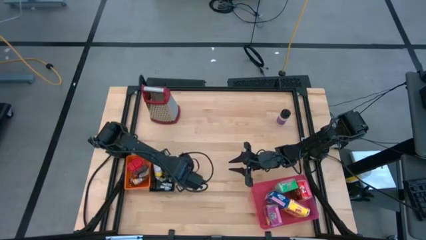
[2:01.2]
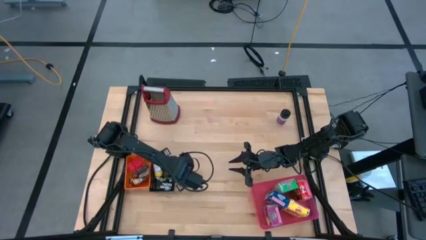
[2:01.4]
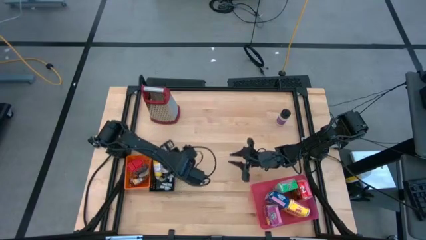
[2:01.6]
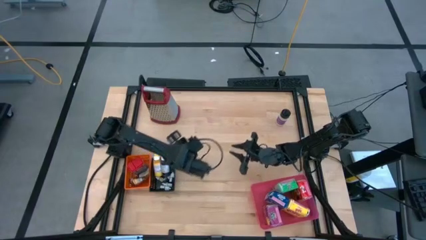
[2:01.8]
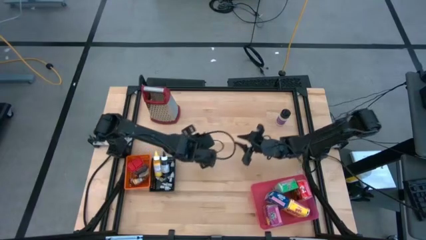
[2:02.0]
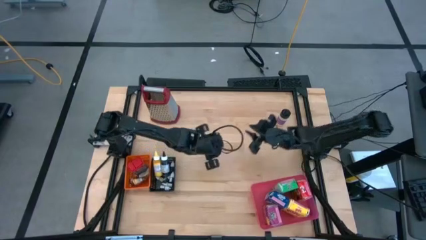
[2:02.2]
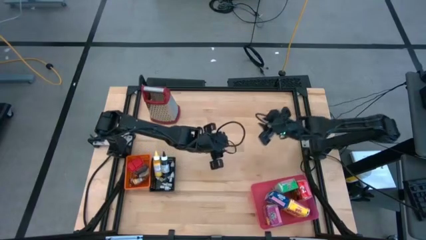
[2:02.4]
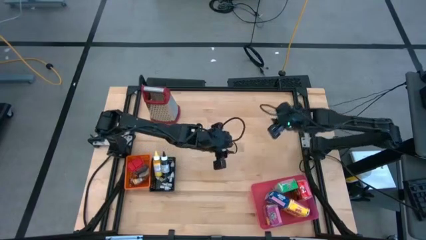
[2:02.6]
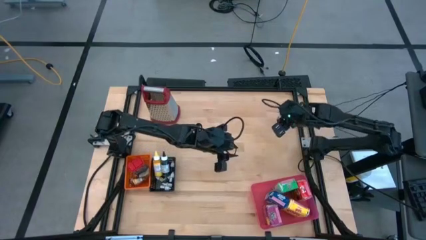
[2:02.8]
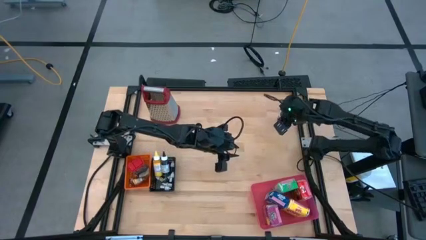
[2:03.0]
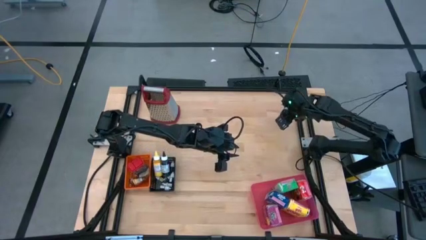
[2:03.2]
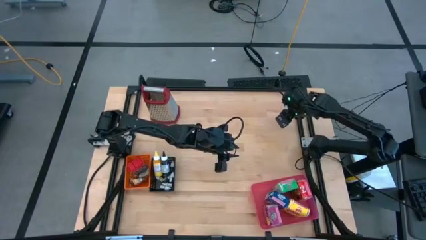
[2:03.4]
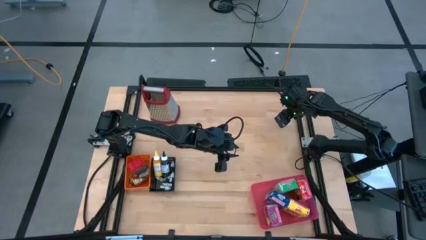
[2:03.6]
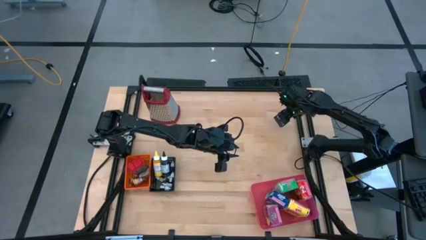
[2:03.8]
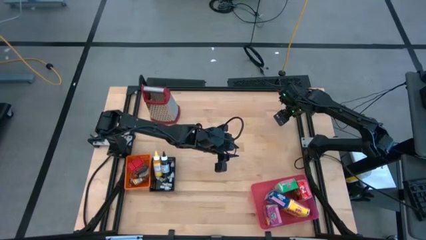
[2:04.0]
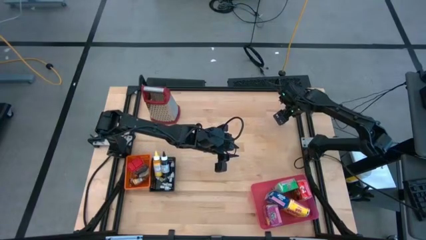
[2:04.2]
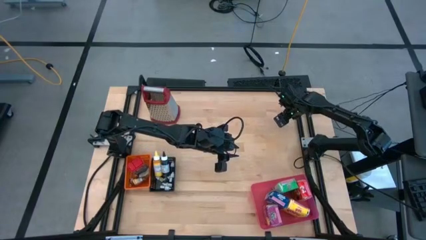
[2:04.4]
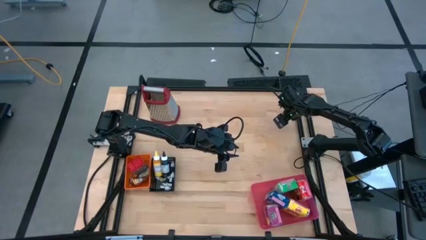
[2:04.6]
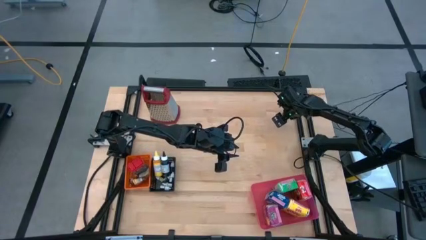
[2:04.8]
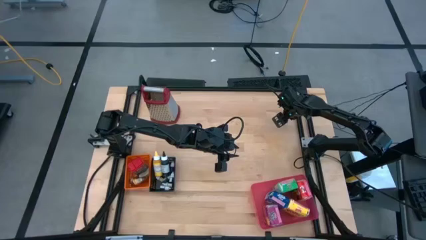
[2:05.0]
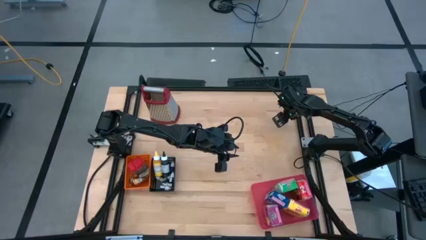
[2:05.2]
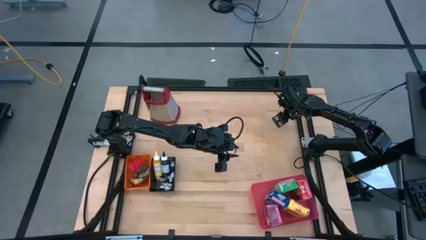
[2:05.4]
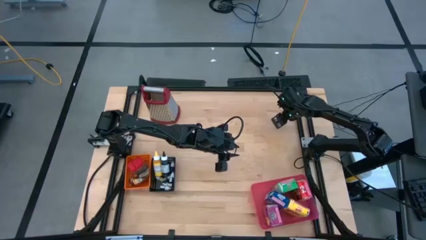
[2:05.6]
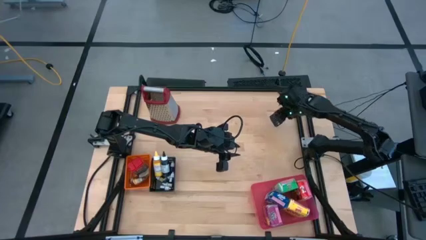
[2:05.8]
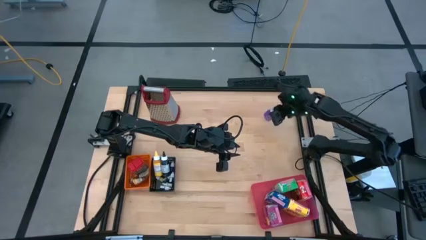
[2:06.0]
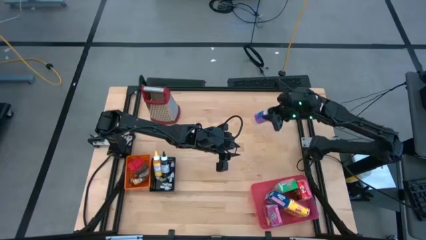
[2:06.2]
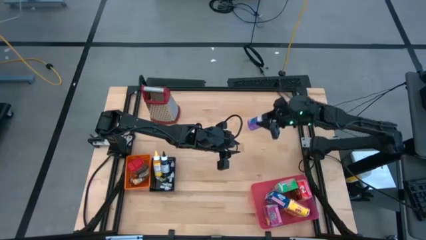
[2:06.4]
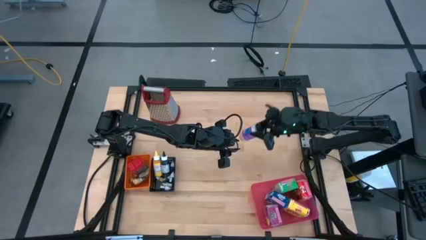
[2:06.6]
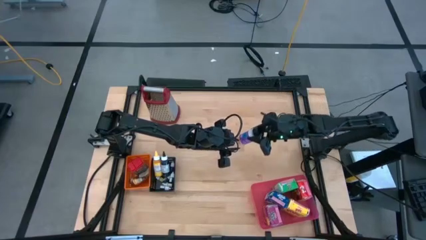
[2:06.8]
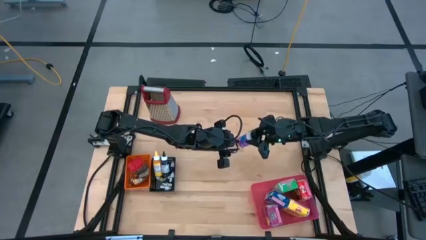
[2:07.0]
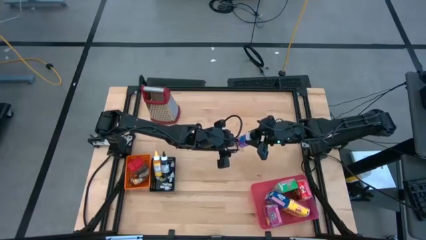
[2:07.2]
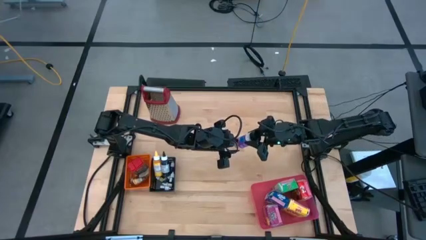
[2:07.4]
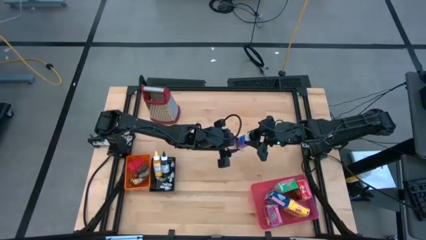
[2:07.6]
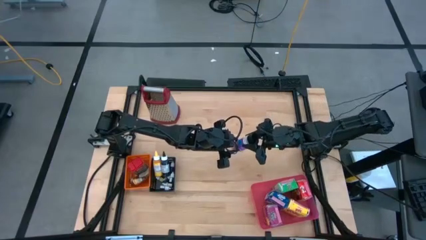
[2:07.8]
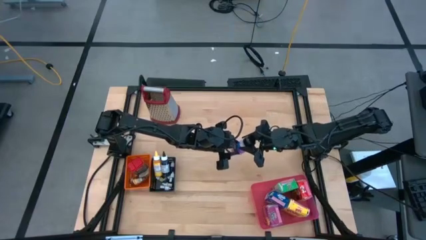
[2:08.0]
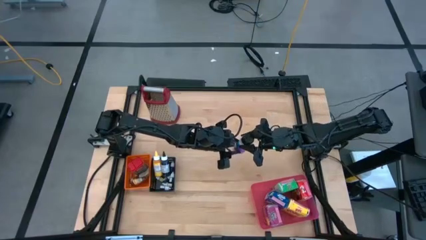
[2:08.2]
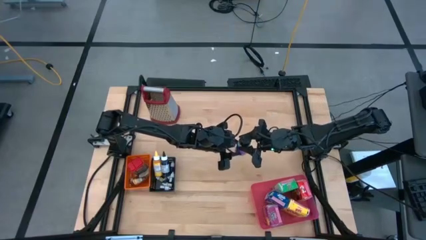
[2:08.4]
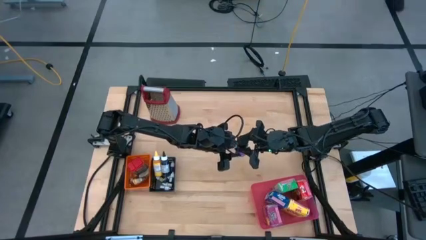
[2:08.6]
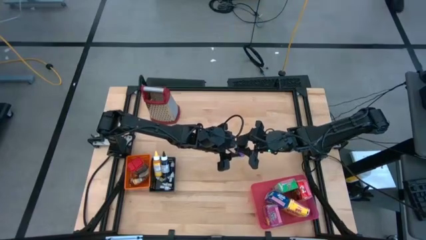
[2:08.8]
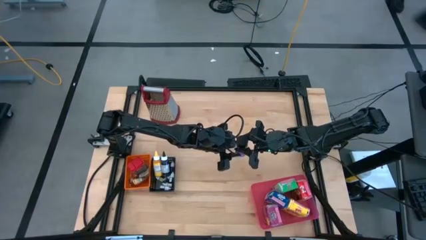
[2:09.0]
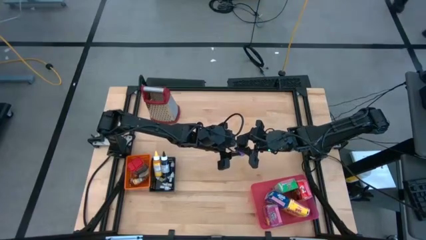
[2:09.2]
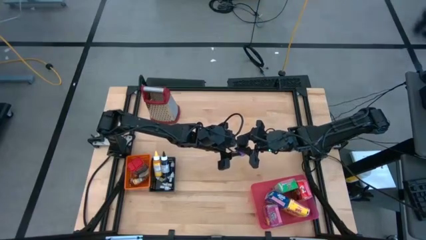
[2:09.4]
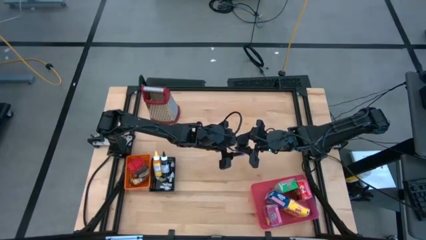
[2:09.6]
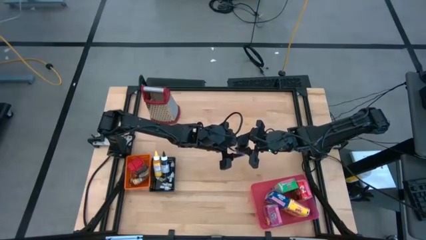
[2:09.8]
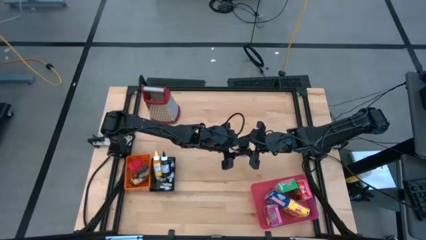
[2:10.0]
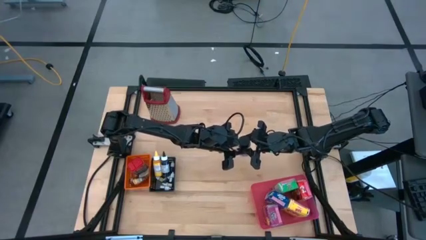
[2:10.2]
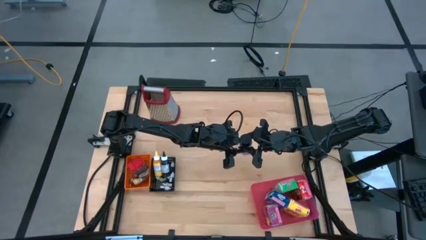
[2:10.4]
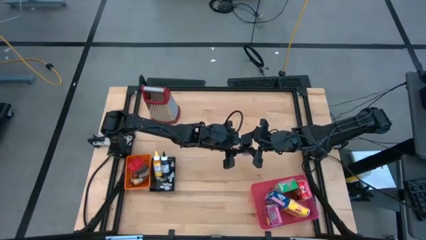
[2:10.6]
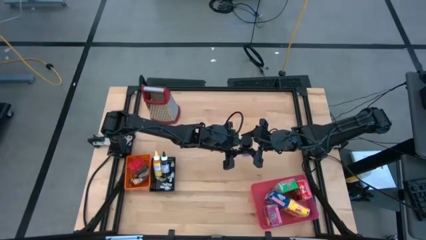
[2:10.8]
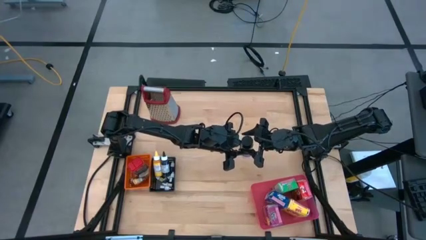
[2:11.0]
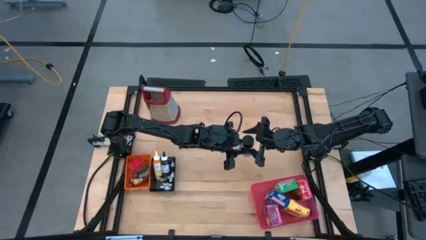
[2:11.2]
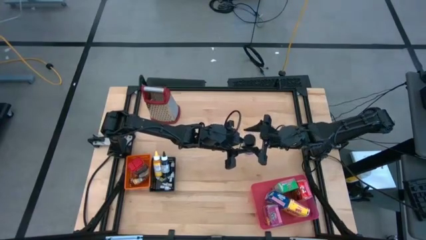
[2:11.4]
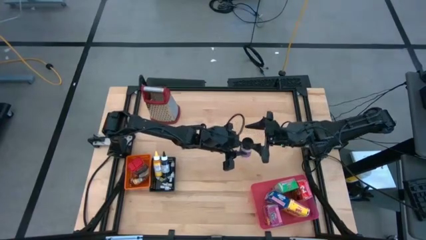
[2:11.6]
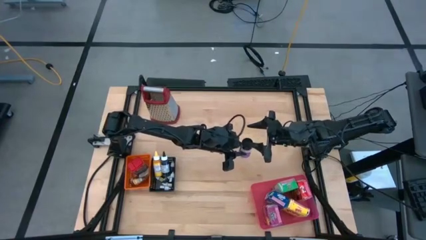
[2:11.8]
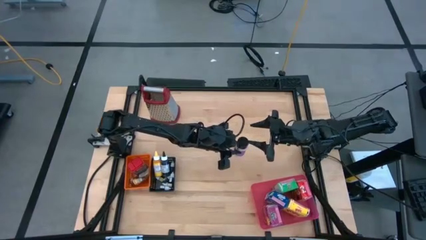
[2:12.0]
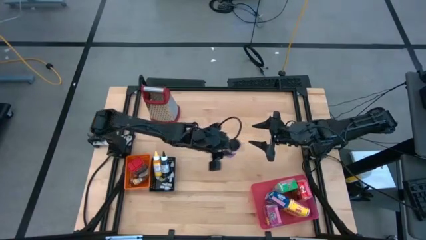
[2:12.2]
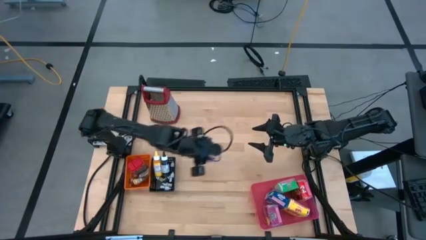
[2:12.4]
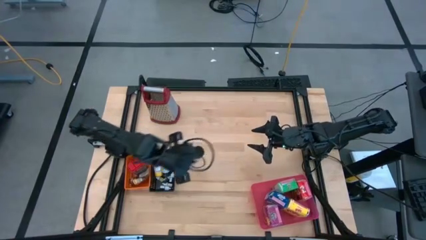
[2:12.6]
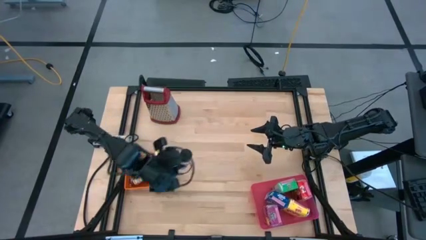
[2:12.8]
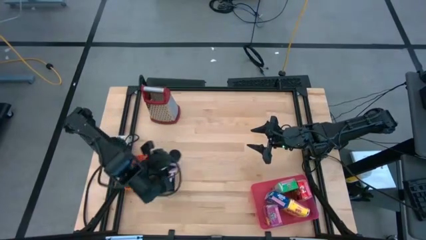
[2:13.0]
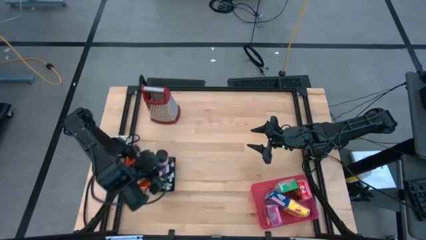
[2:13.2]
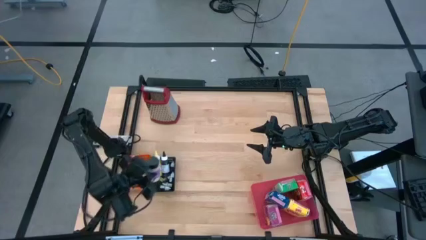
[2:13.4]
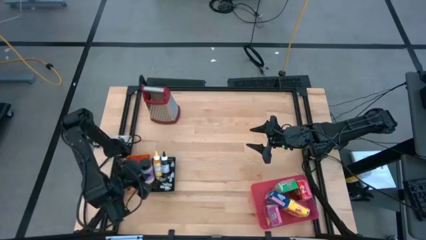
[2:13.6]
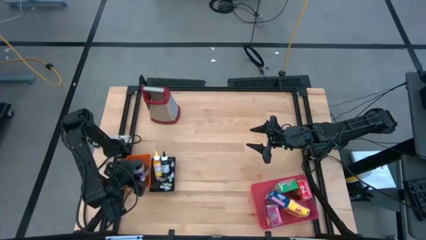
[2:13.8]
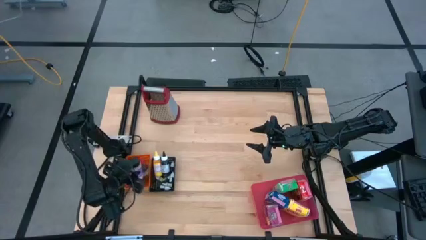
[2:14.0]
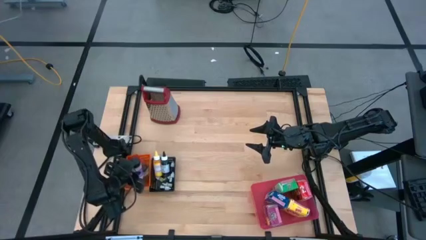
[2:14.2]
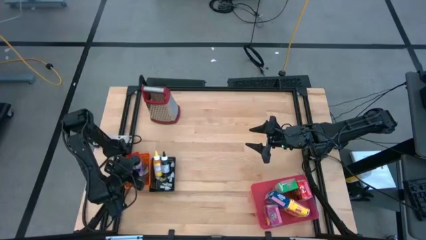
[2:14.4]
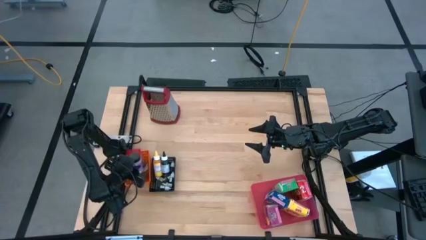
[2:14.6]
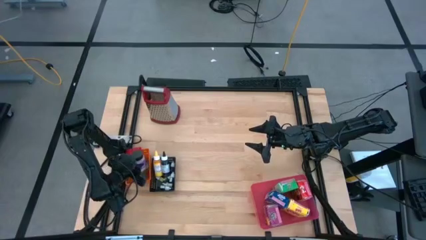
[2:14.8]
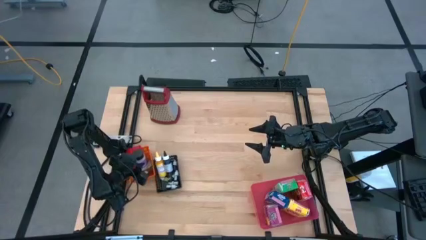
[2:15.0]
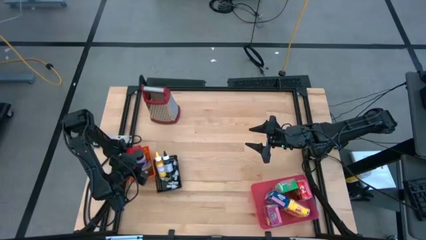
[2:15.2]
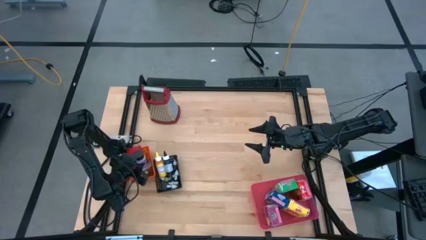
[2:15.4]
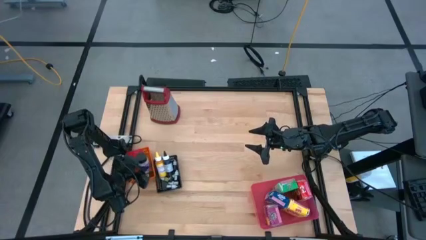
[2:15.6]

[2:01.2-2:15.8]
Task: Pick & Place Kitchen Items
Put the purple spice bottle into the orange bin

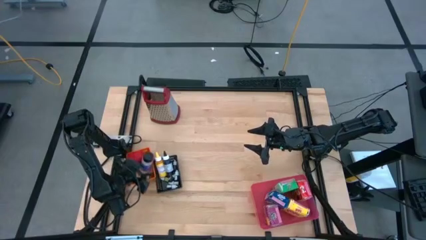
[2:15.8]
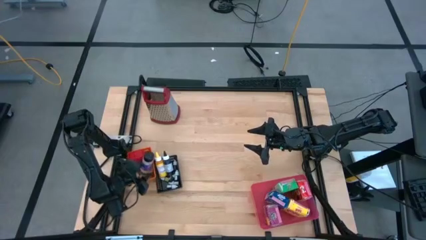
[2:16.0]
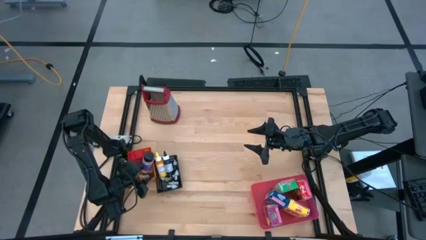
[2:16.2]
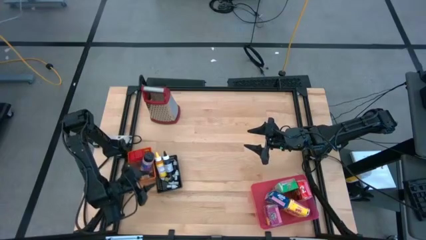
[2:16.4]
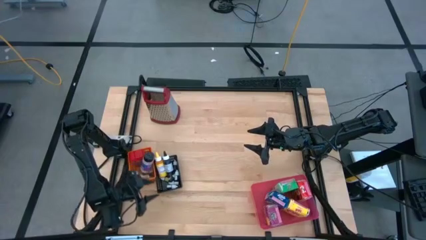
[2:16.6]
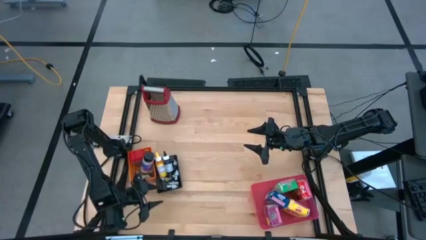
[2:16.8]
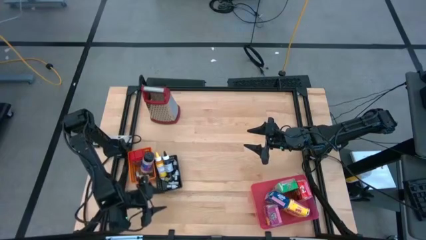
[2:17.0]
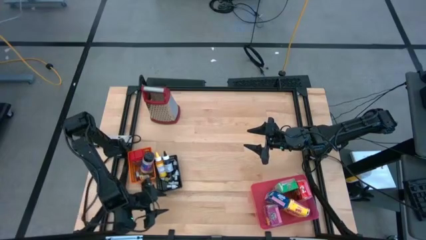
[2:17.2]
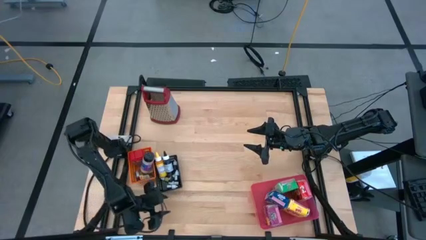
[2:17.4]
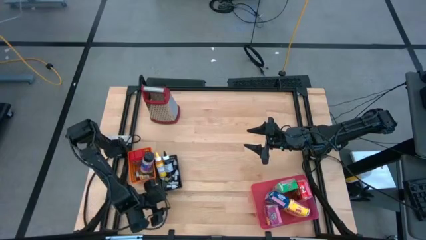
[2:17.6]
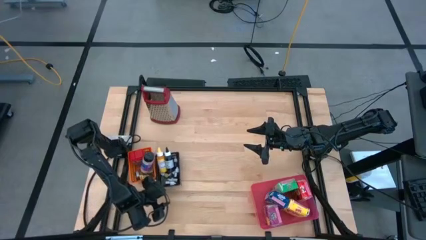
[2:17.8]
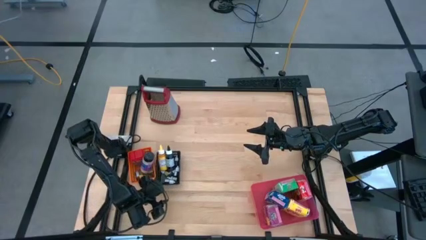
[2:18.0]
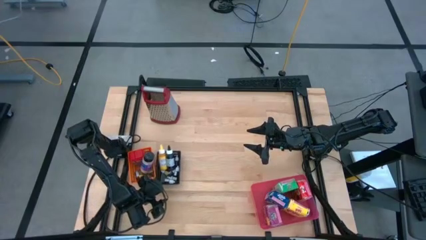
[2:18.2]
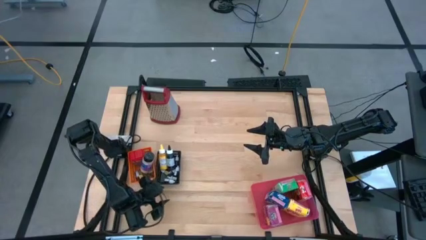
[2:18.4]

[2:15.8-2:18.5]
Adjust the black bin
